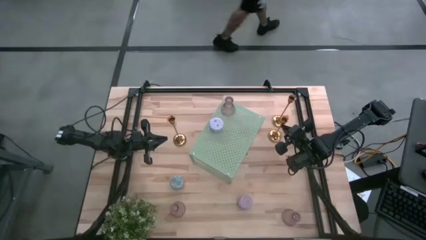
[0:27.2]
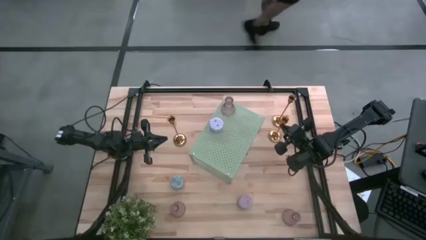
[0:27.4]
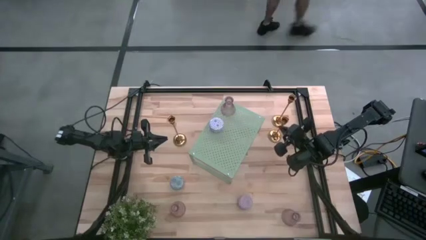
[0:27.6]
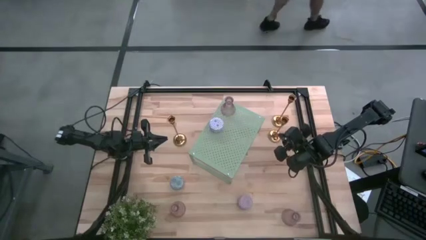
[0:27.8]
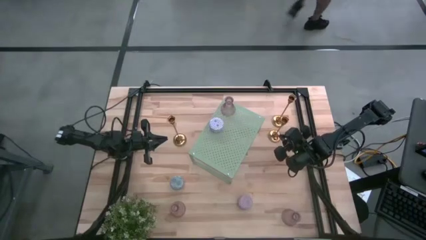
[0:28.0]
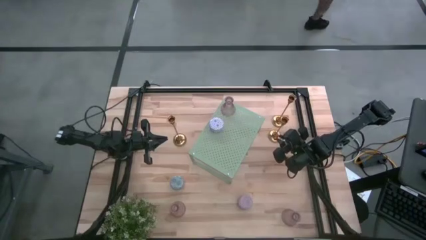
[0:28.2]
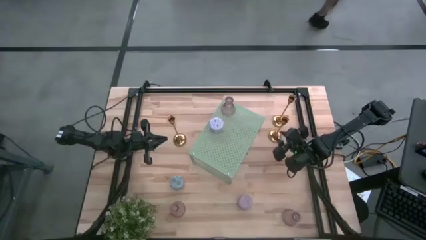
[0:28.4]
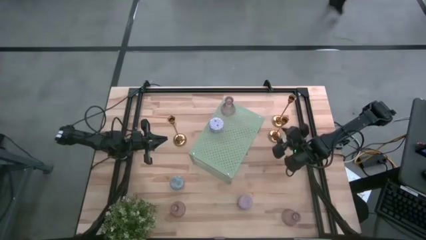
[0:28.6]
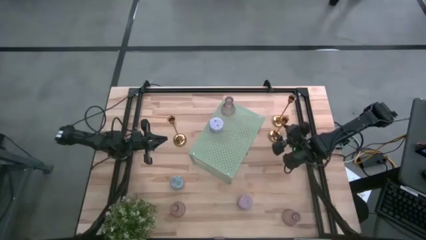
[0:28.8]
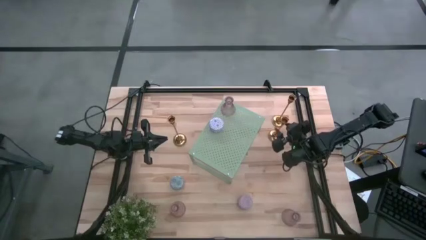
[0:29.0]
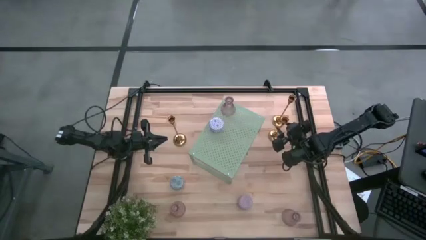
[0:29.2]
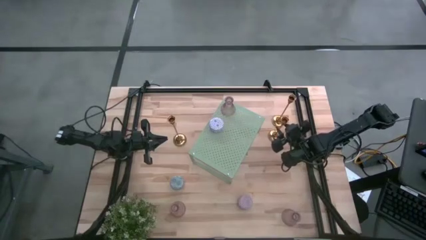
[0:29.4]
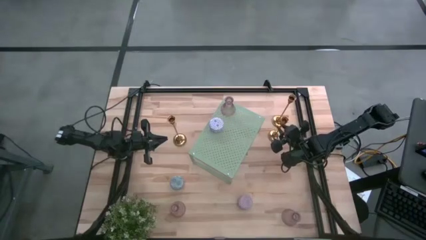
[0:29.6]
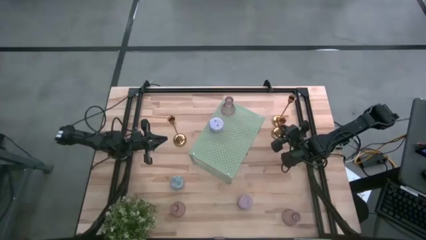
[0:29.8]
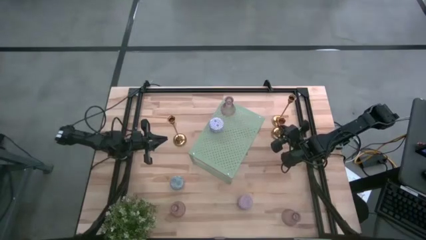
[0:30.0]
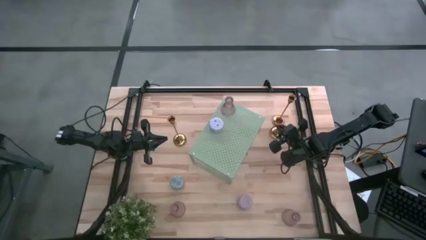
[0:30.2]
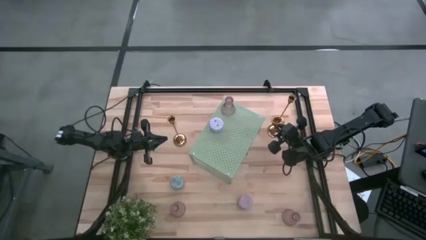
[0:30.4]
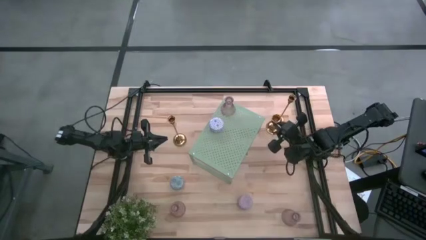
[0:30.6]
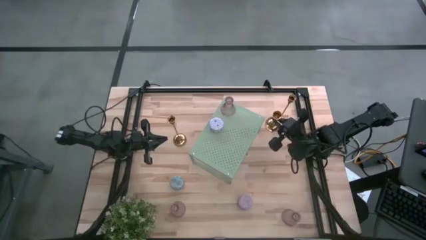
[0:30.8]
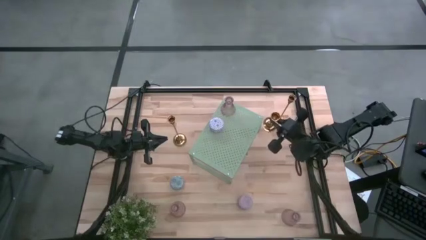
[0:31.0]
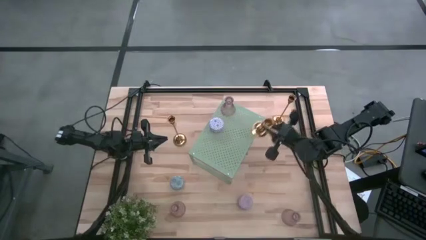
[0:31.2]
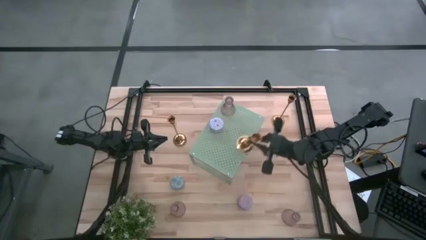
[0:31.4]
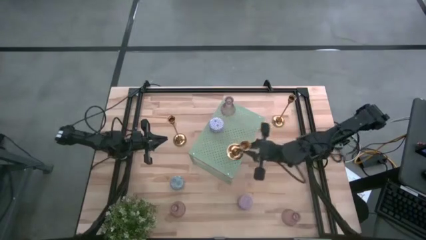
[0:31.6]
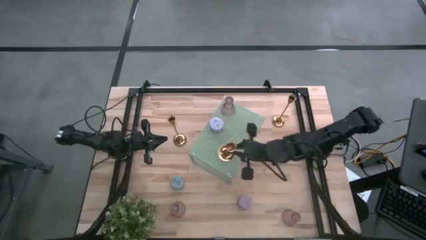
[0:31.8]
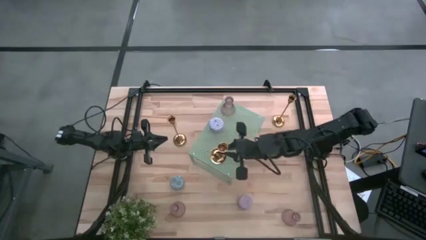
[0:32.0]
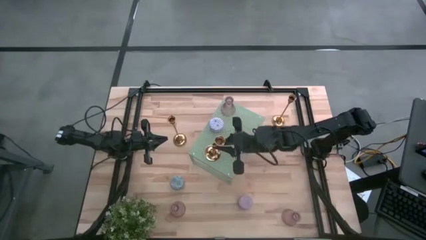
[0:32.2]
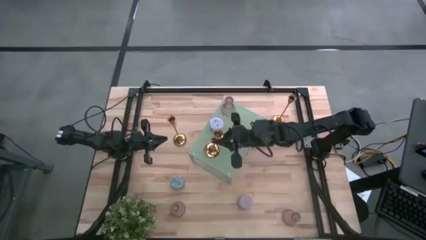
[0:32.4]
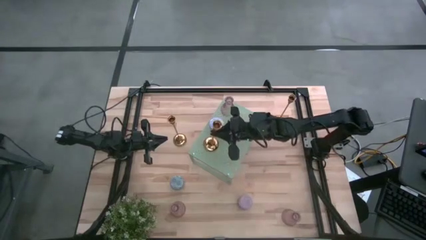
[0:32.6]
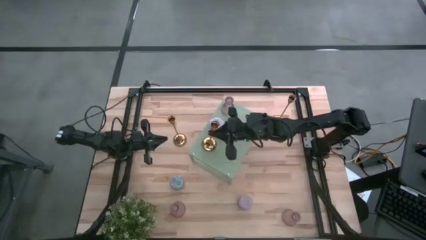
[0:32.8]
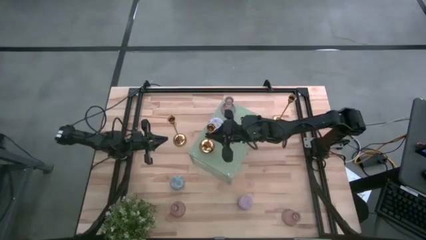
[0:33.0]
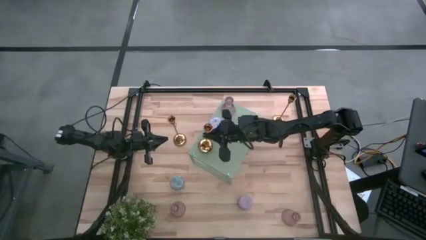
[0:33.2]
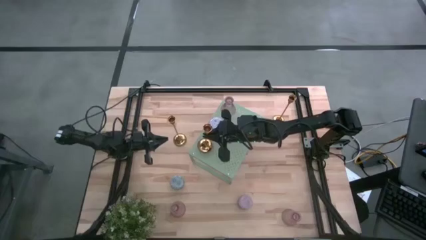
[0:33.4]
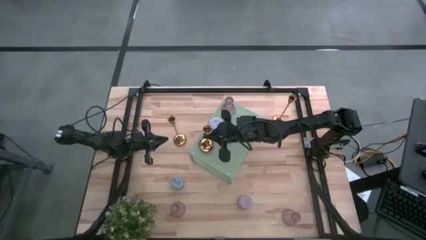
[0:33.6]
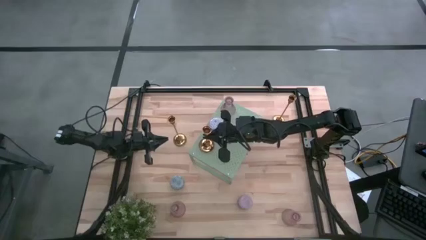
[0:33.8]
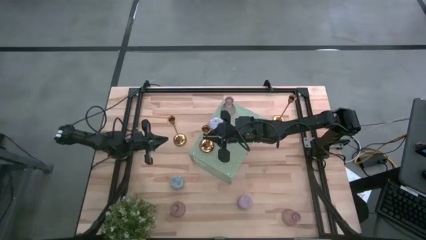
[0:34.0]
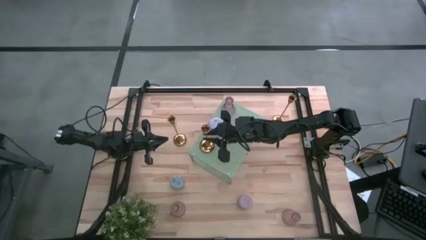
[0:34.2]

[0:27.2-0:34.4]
Task: Pick & Place candle stick holders
Put the bottom right gold candle holder on the shelf

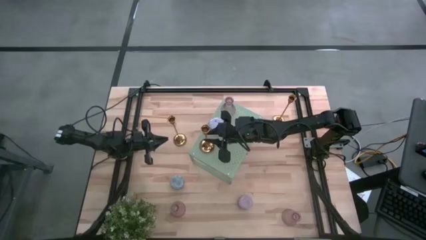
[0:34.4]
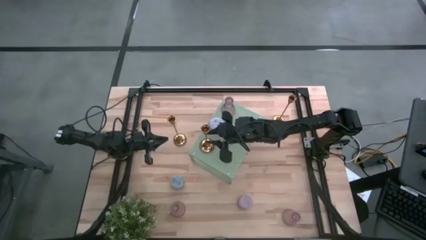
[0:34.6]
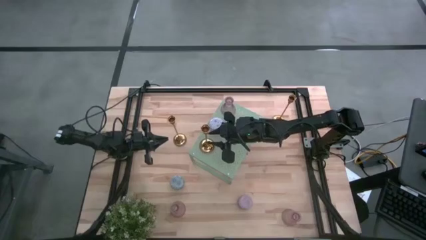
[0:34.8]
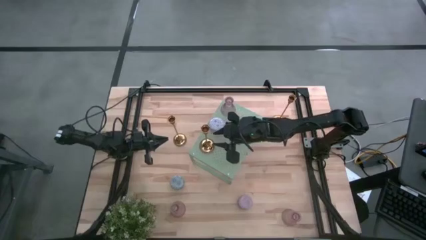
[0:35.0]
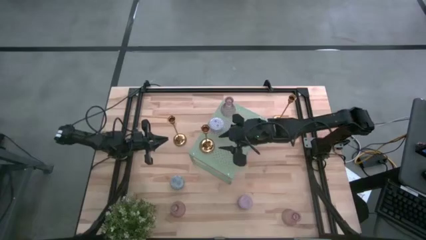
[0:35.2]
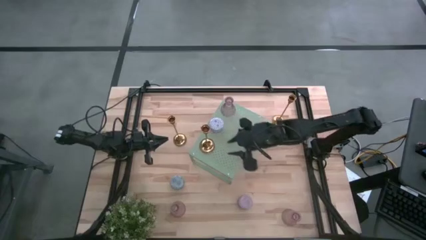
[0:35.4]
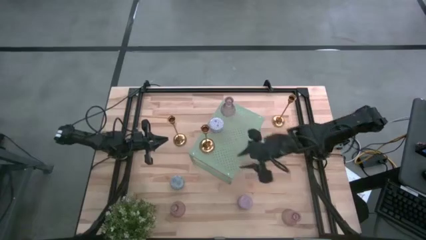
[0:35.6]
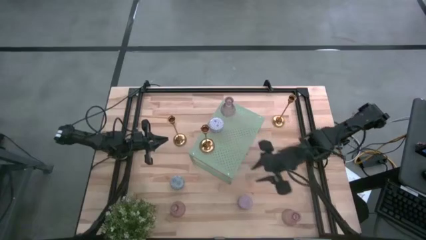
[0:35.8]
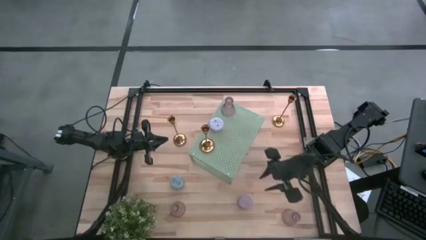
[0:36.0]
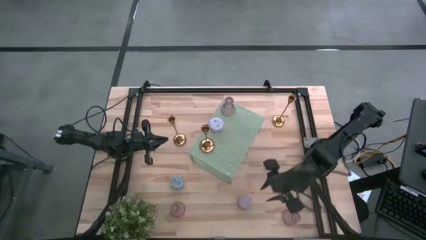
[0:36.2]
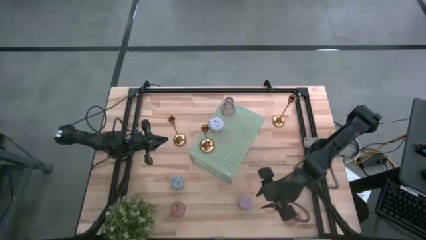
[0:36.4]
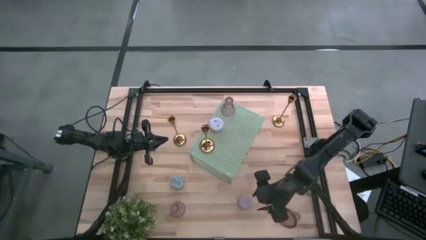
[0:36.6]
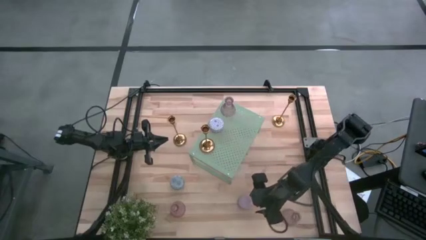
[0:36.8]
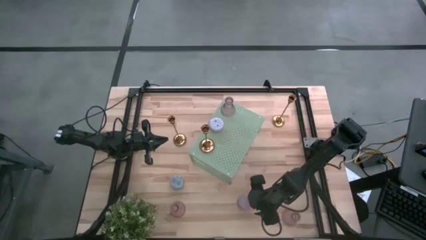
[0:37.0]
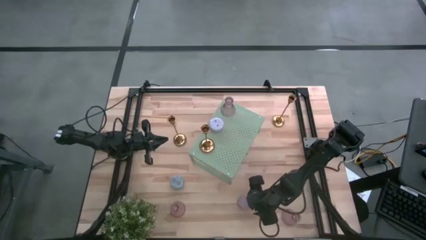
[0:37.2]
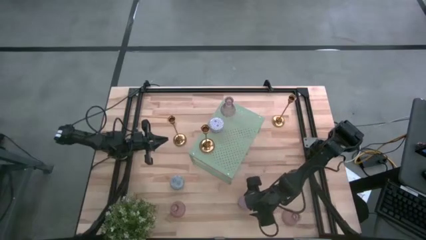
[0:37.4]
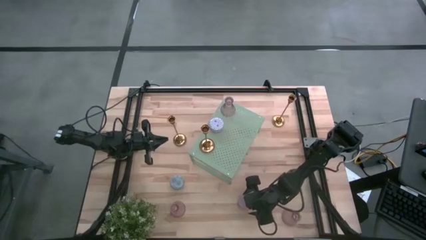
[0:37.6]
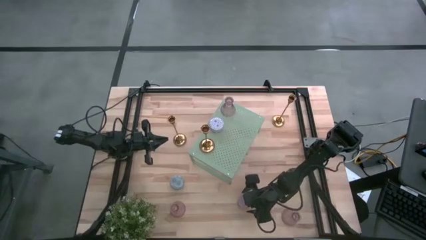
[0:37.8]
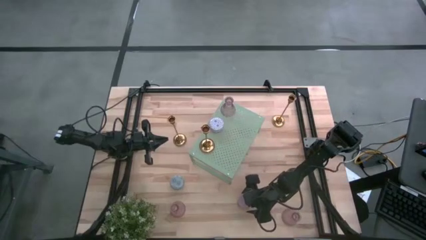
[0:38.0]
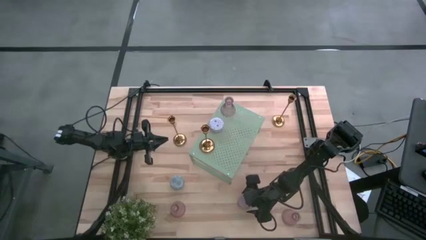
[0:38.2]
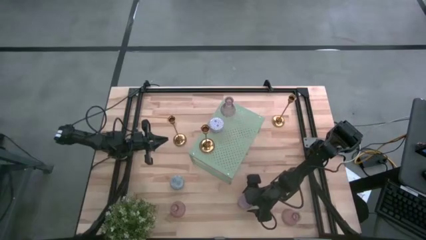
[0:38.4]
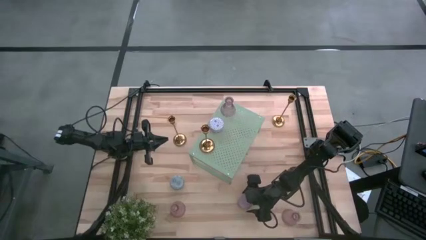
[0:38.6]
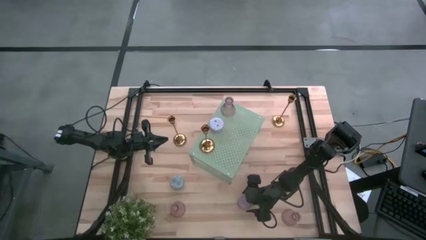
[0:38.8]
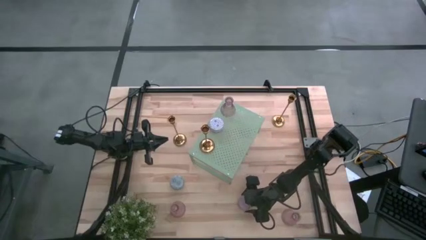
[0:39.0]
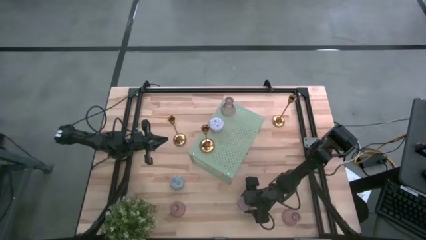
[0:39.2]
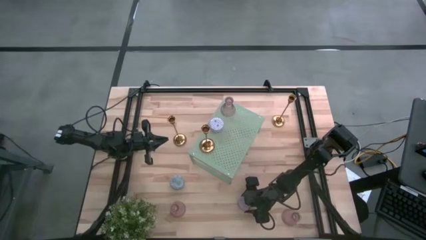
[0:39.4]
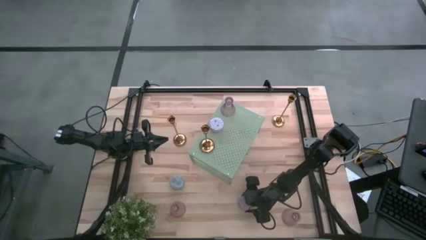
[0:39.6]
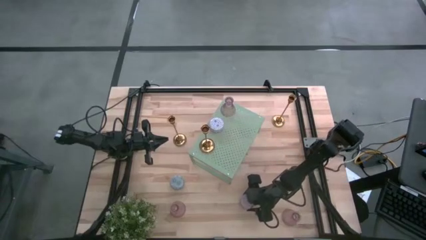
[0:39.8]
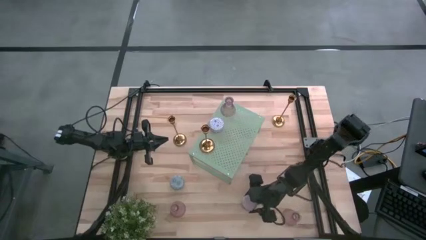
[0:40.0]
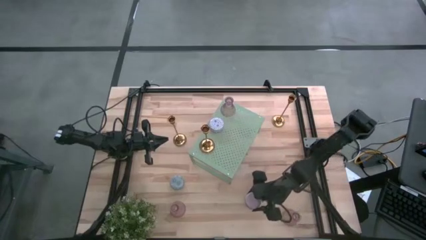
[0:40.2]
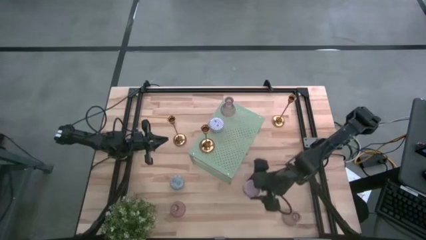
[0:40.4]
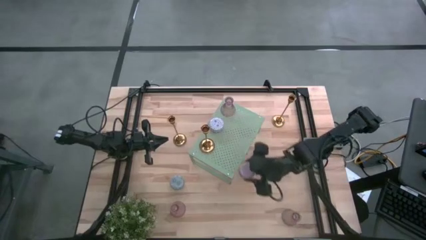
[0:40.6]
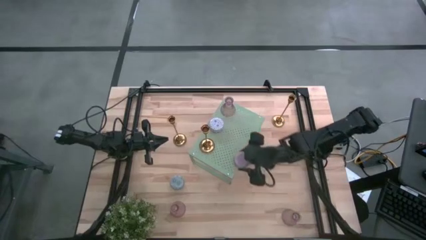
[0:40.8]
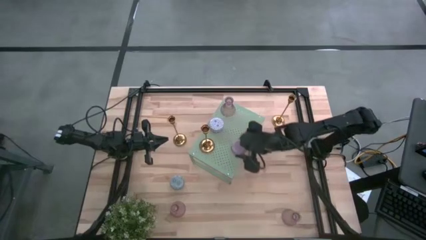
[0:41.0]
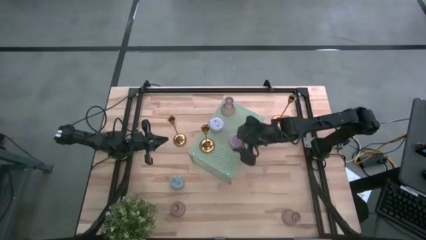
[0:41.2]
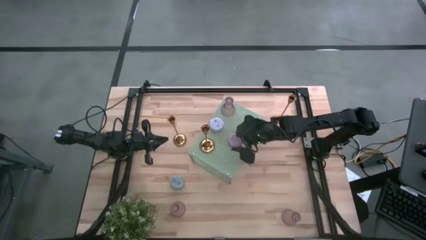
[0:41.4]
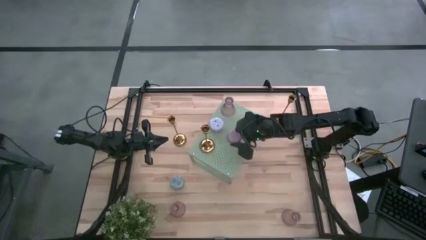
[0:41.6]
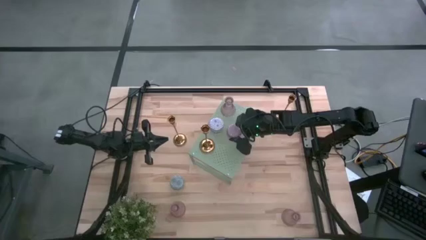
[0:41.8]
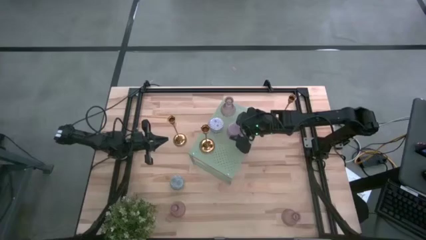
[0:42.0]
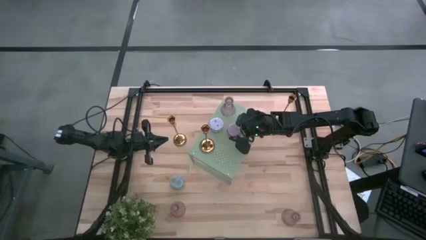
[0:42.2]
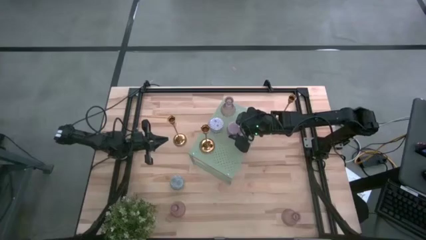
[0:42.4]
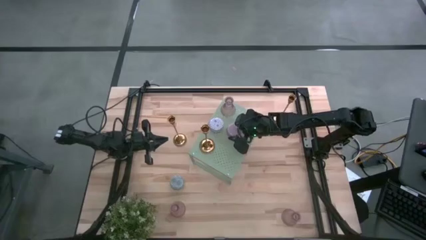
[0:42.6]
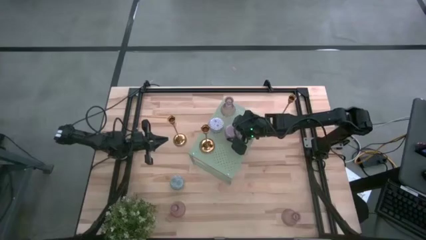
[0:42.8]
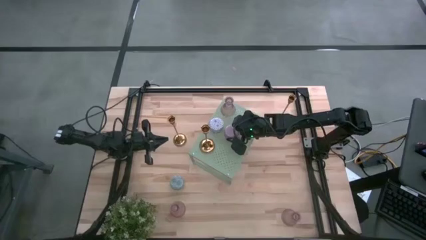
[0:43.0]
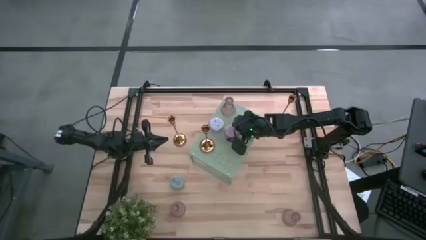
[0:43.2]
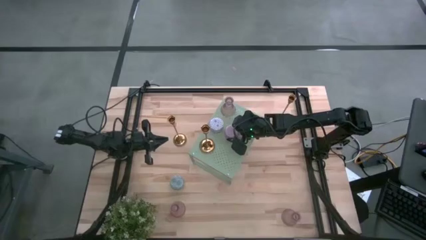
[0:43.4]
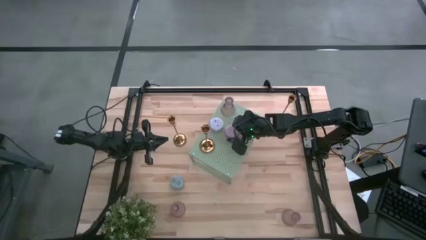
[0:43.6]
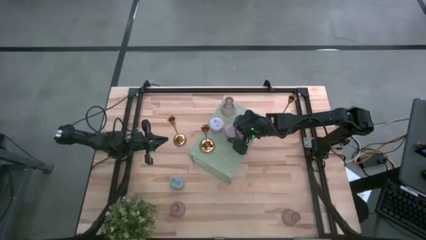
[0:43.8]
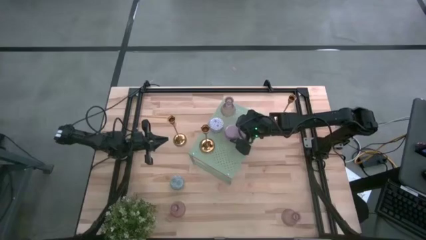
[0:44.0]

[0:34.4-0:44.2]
Put the purple scented candle aligned with the other scented candle on the shelf
